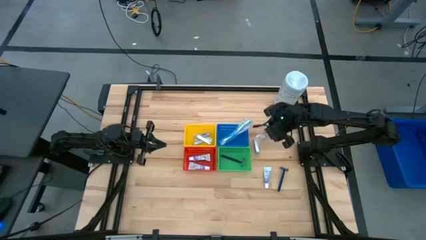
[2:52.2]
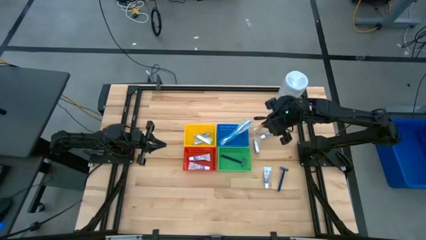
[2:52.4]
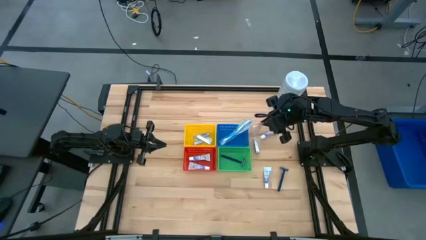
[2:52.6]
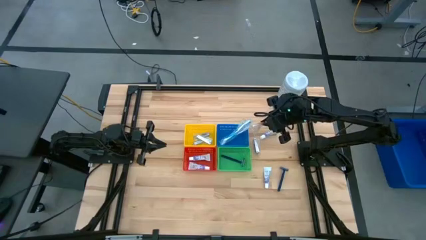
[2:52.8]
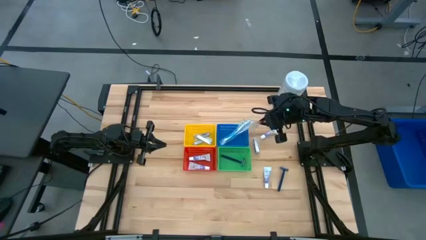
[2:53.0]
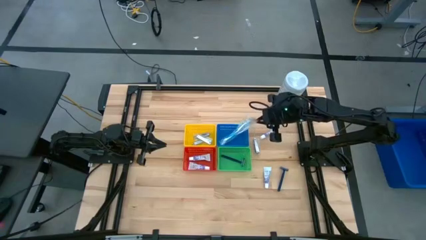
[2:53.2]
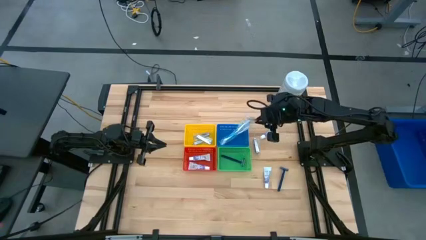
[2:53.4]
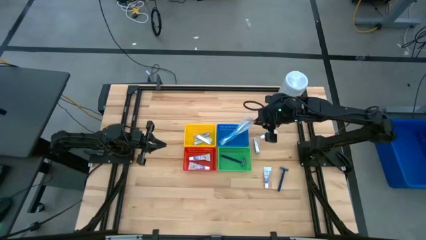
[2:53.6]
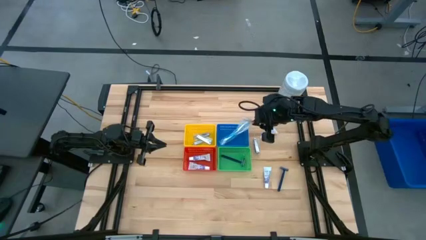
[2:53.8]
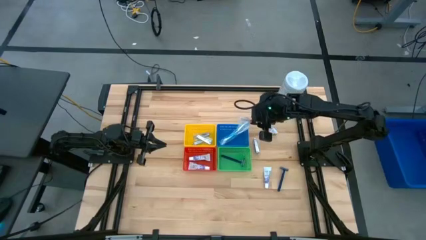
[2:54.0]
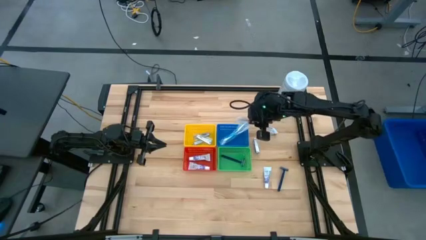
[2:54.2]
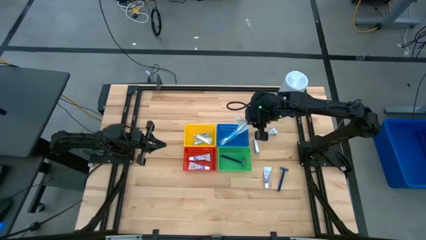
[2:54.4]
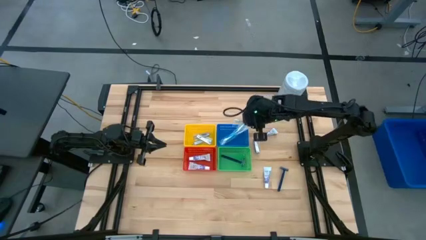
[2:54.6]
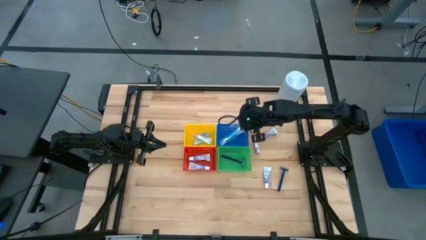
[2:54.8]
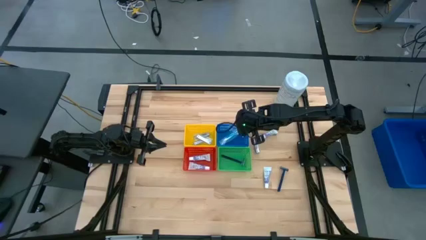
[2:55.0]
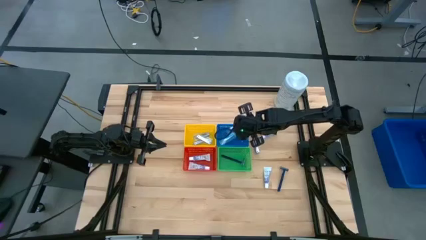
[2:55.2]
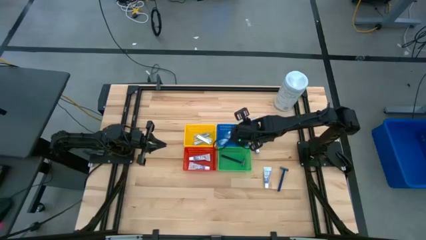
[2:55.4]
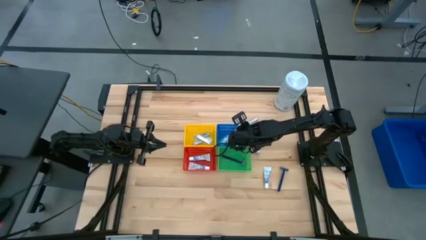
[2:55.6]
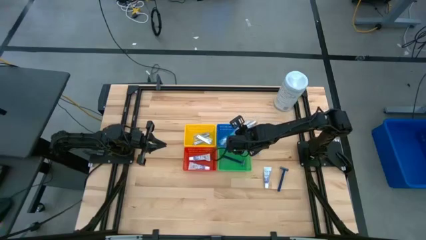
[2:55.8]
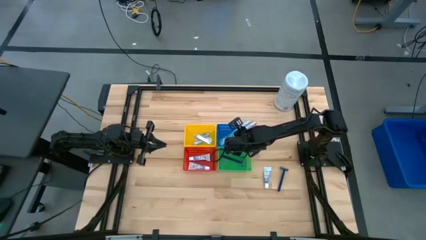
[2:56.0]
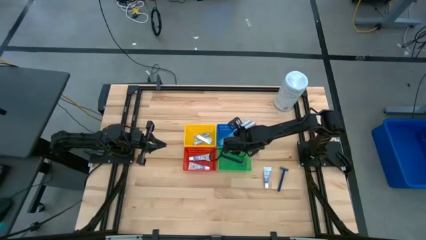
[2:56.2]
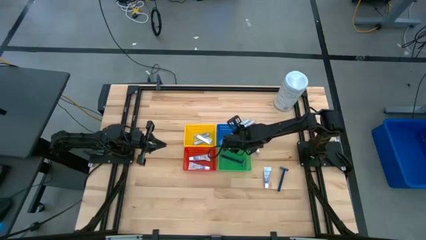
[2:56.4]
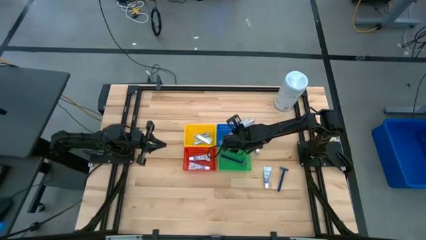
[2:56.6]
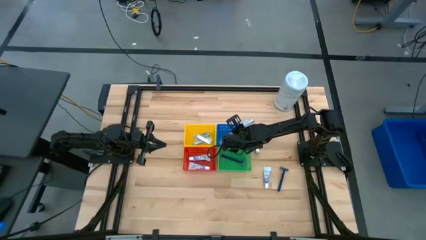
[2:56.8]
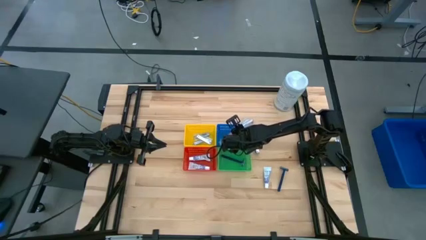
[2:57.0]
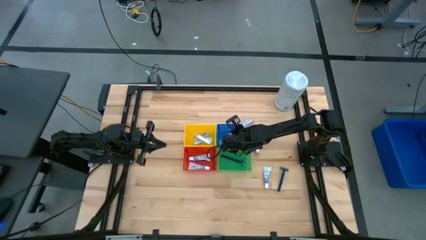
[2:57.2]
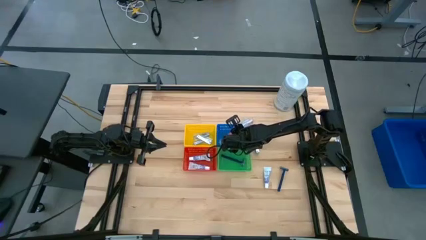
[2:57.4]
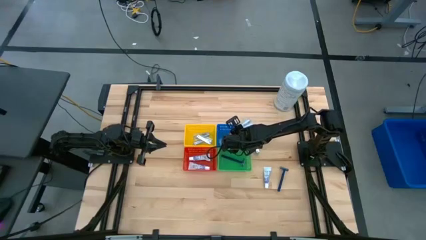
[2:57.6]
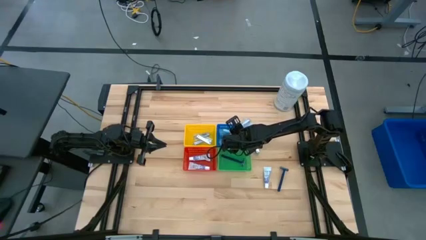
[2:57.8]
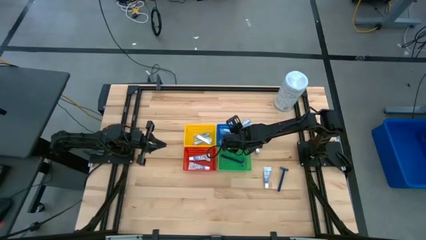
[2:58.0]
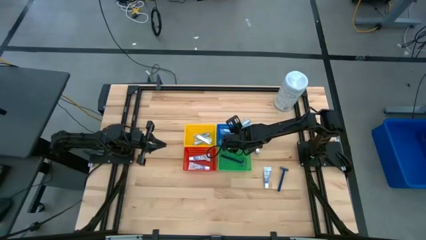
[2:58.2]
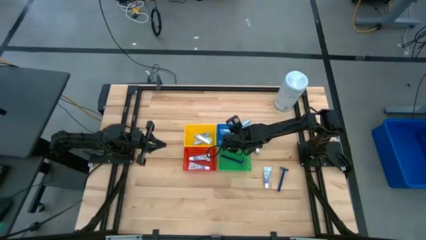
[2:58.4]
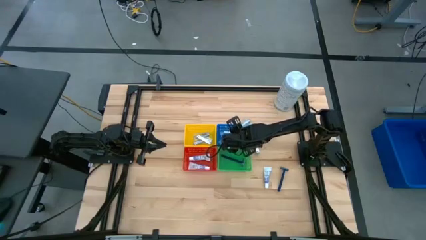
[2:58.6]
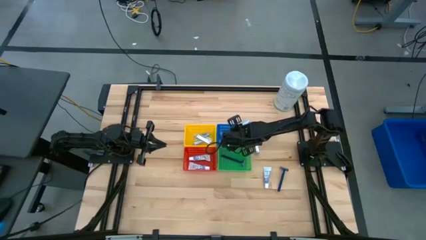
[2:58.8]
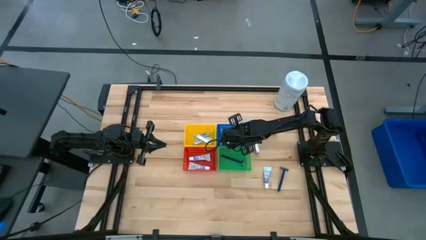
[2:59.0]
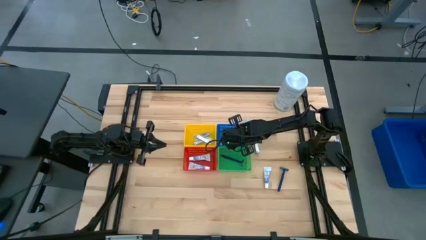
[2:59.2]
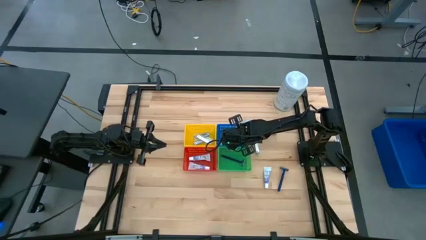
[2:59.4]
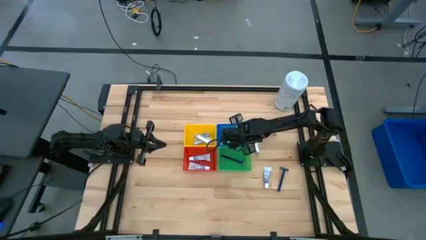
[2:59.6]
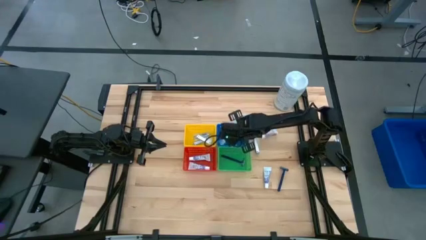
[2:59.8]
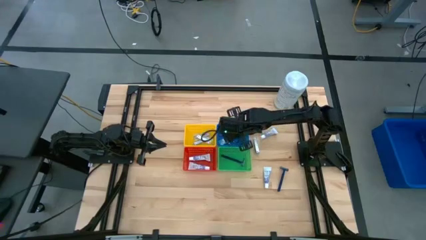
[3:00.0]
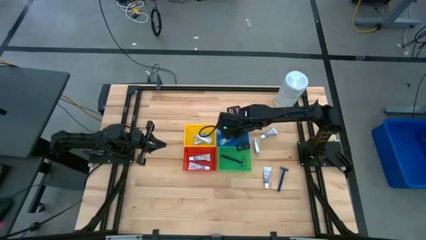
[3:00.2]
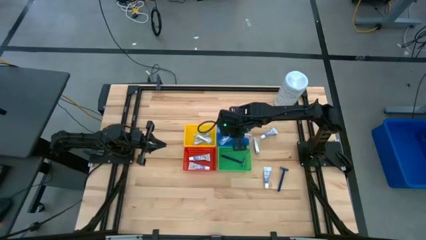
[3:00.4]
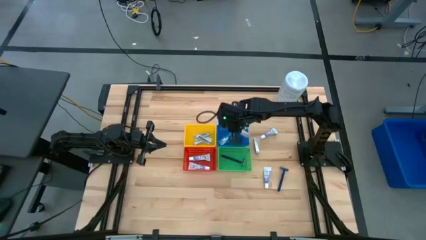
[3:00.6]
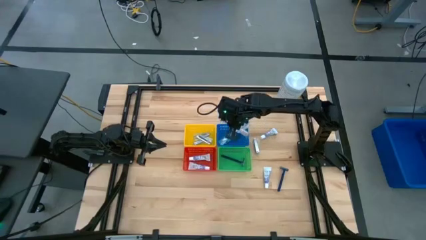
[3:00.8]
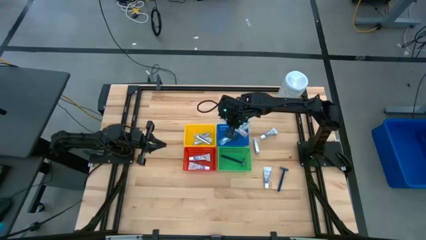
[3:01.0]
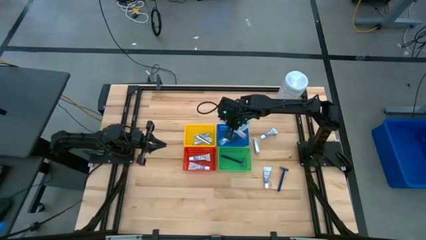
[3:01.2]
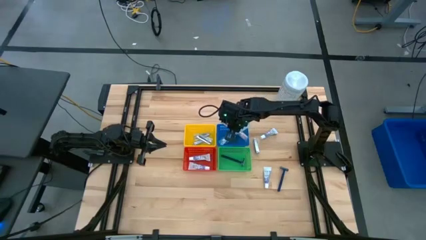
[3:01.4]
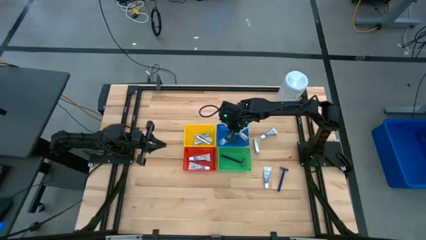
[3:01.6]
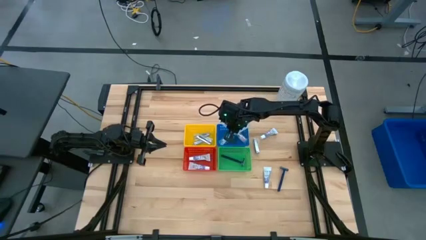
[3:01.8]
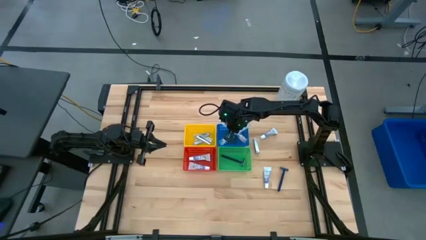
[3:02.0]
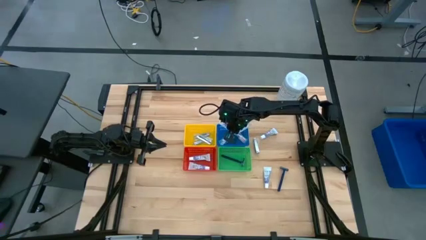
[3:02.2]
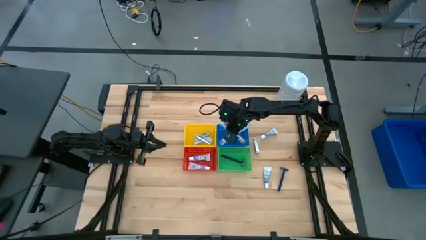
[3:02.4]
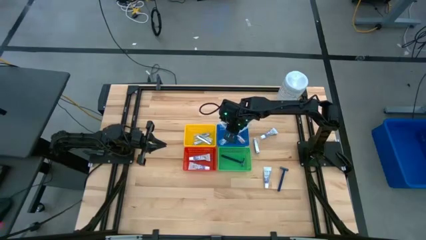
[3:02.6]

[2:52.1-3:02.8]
Task: Pick & Place Travel size toiletries
Put the red toothbrush into the blue bin

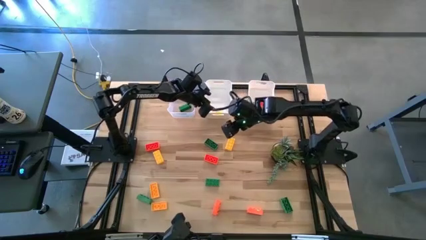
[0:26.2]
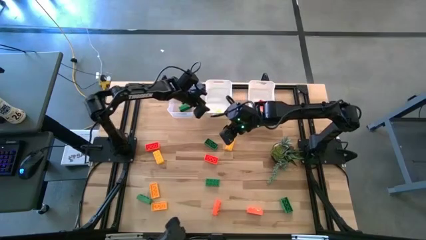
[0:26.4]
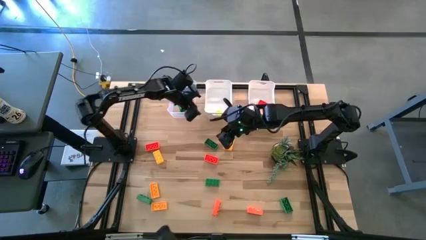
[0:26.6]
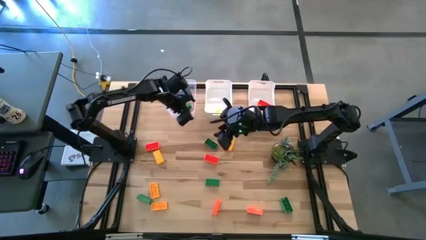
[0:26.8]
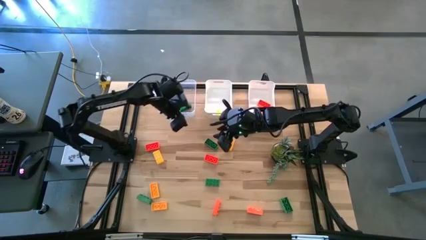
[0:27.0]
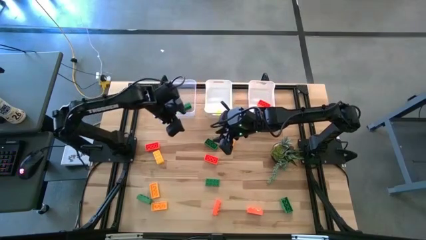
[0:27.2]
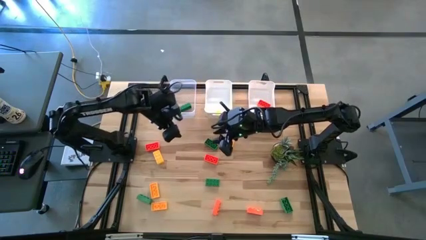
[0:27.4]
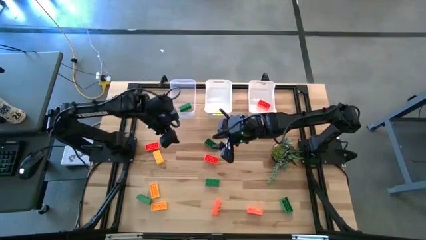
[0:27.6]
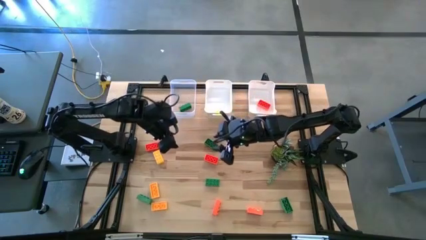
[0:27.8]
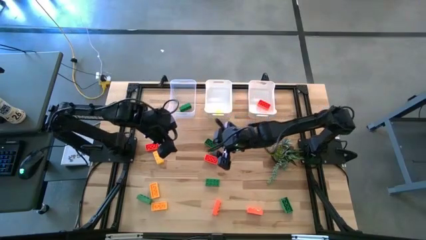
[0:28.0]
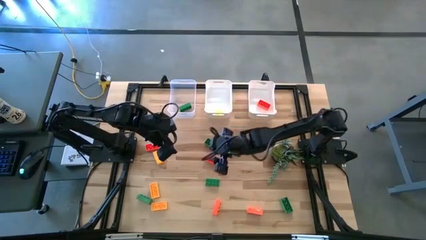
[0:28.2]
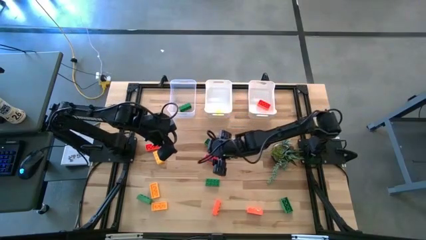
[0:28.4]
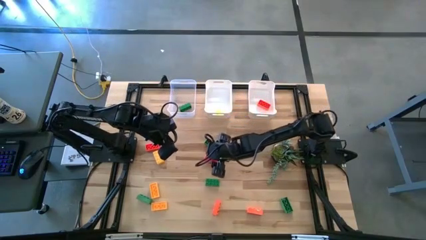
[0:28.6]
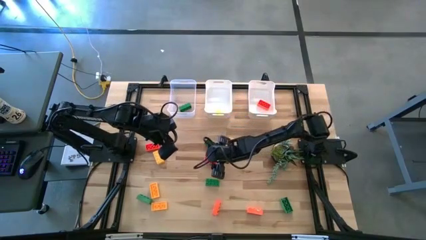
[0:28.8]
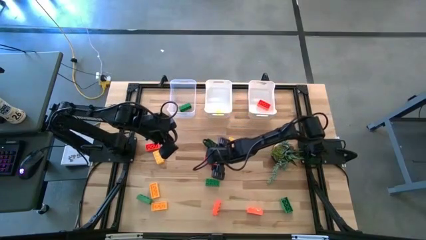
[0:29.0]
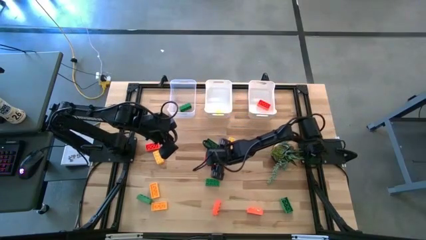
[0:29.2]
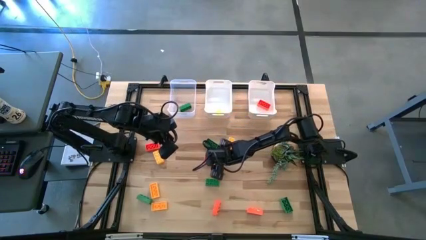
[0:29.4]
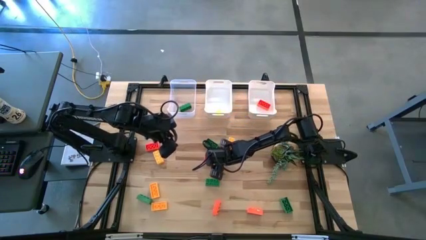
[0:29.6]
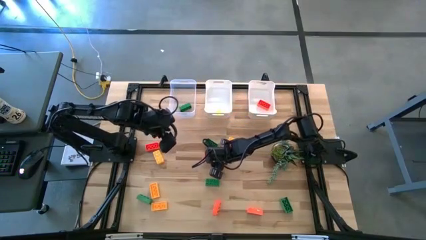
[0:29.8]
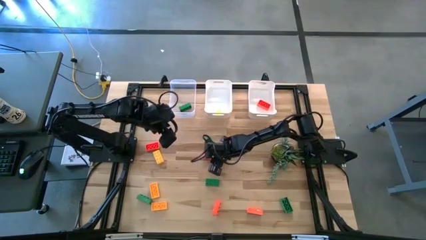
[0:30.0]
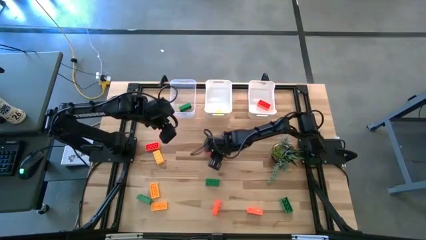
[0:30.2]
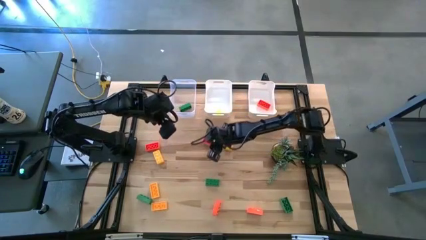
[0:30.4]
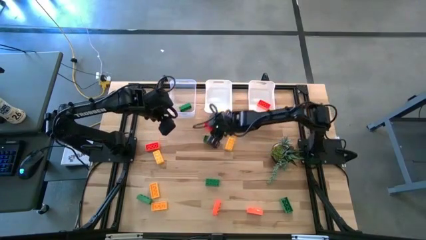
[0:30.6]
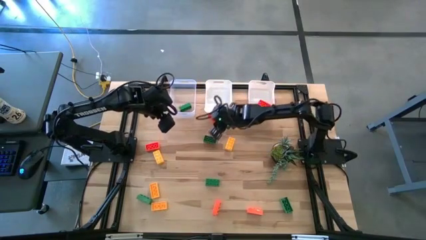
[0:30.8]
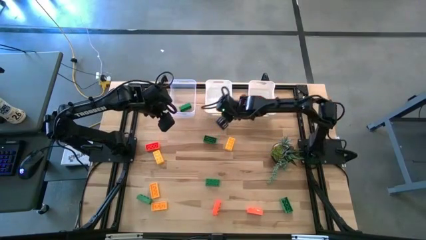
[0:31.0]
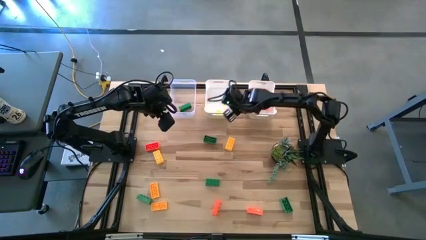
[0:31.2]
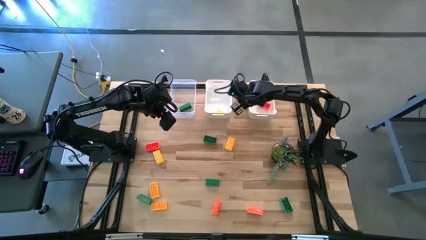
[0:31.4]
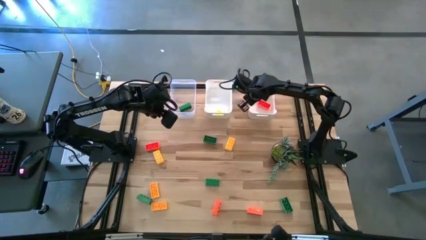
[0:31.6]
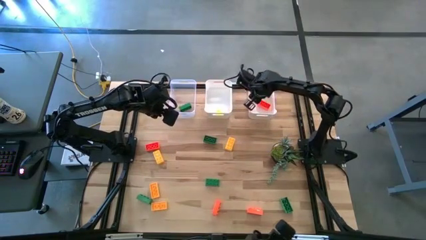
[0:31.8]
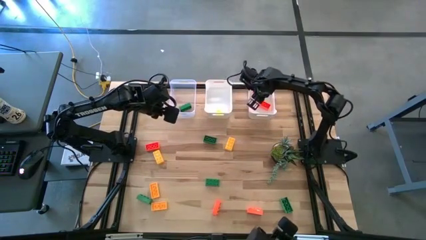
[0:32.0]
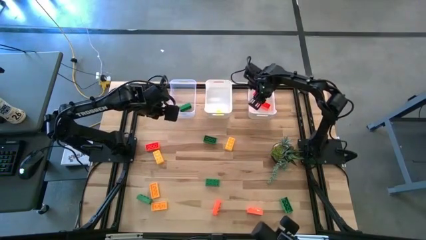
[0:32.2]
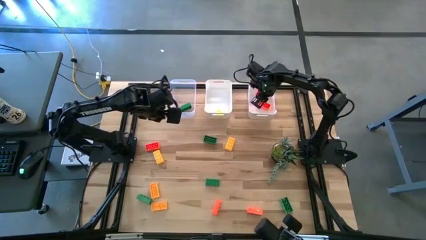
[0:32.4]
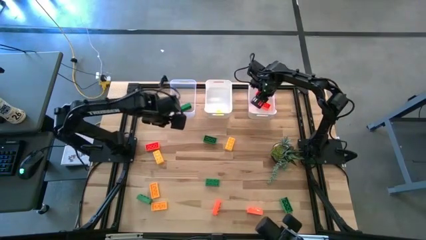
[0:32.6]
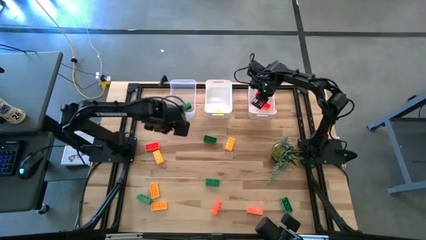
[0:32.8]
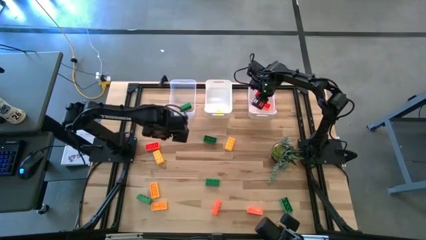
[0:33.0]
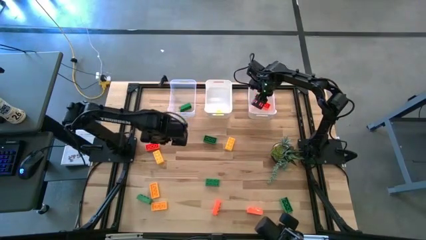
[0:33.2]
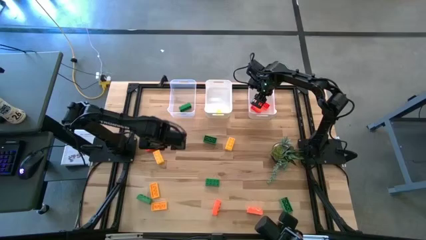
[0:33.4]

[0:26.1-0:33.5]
Task: Sort & place blocks by color
Put the orange game piece into the right white bin
